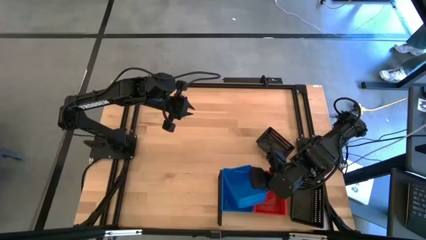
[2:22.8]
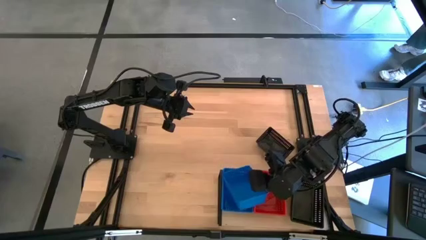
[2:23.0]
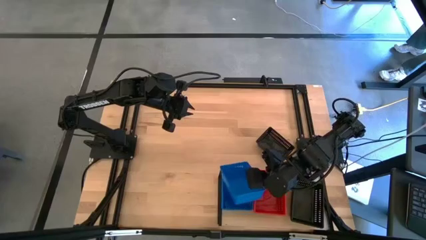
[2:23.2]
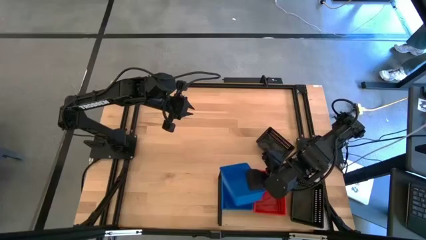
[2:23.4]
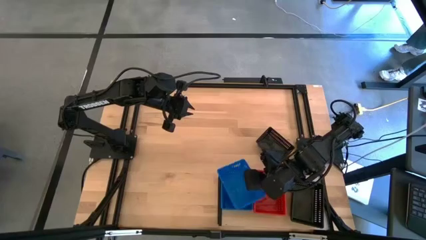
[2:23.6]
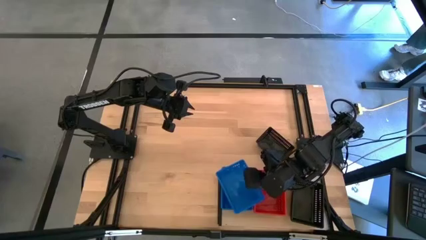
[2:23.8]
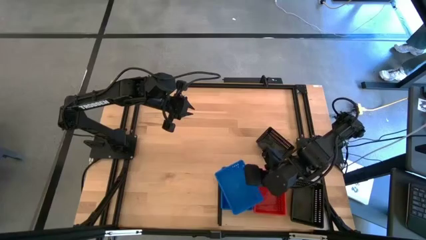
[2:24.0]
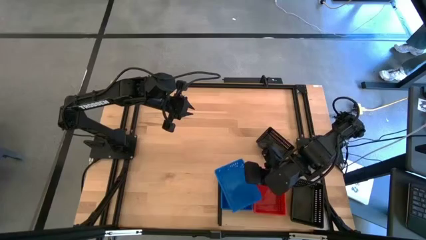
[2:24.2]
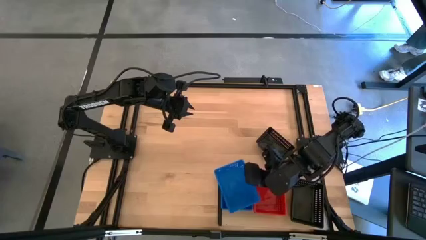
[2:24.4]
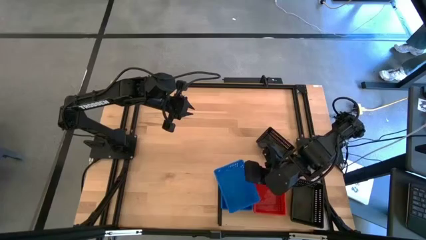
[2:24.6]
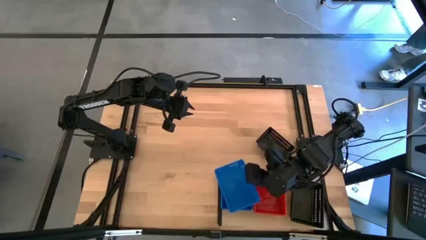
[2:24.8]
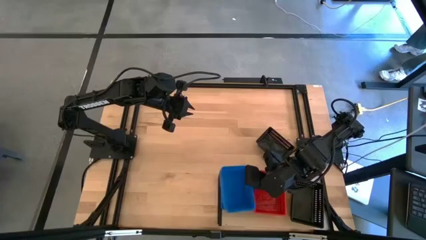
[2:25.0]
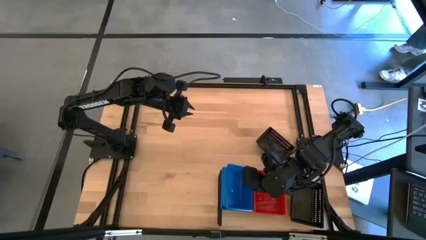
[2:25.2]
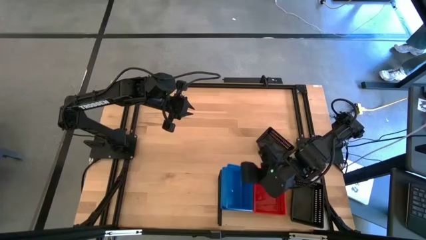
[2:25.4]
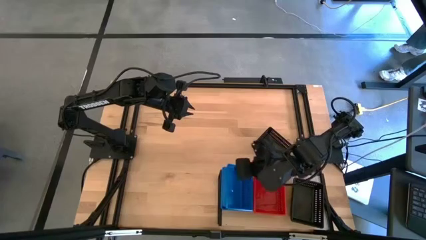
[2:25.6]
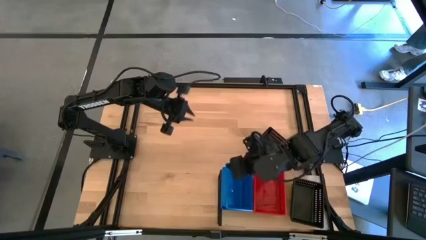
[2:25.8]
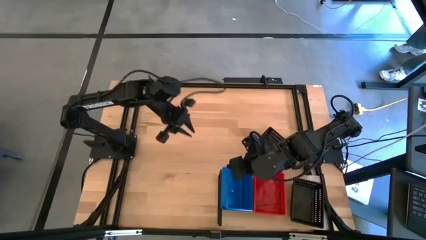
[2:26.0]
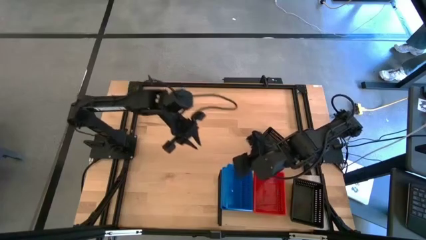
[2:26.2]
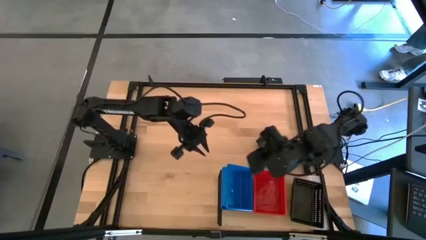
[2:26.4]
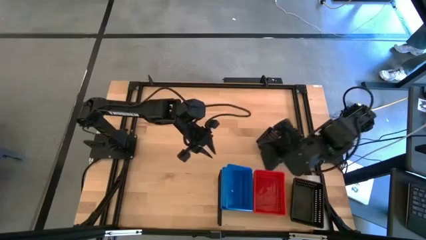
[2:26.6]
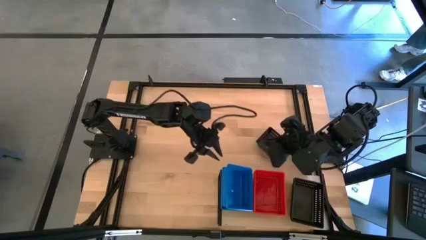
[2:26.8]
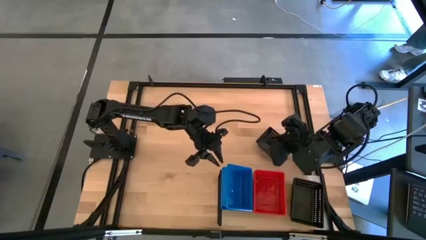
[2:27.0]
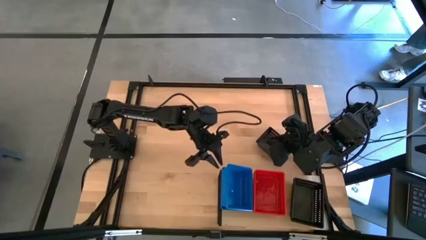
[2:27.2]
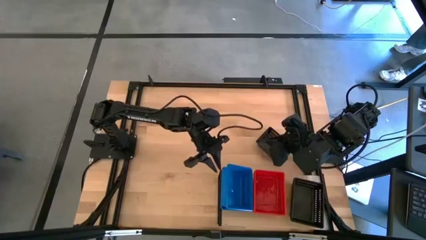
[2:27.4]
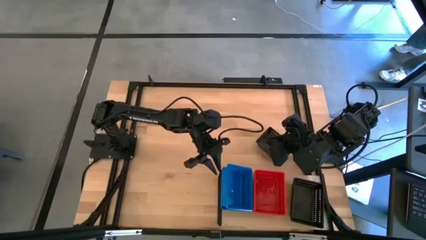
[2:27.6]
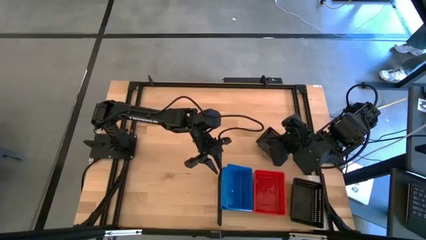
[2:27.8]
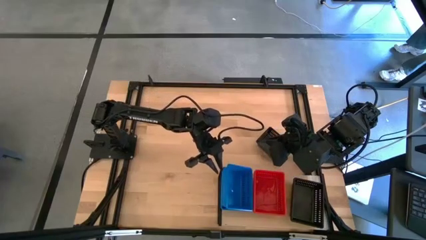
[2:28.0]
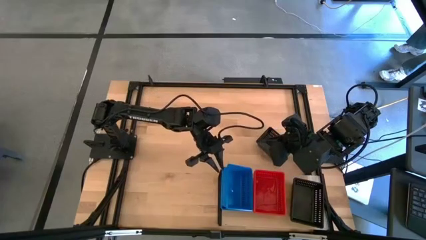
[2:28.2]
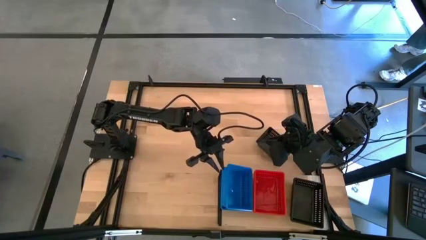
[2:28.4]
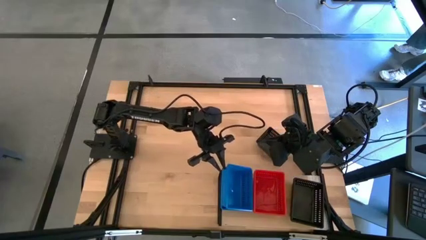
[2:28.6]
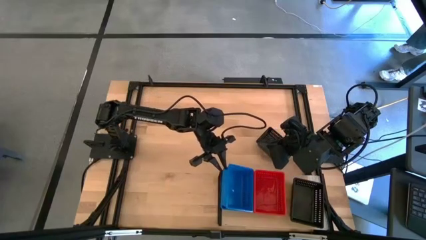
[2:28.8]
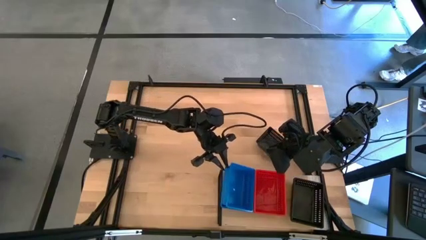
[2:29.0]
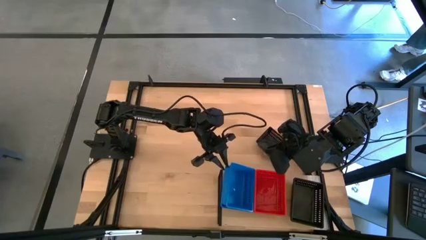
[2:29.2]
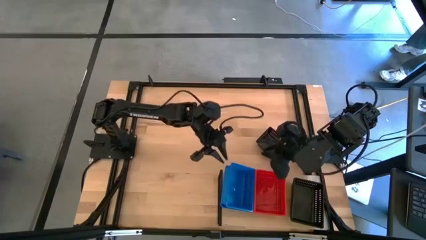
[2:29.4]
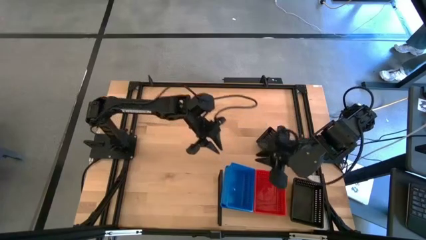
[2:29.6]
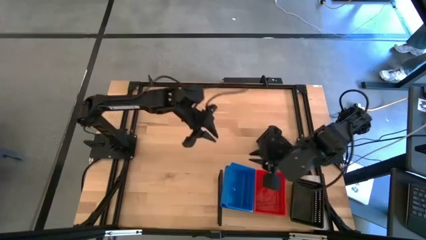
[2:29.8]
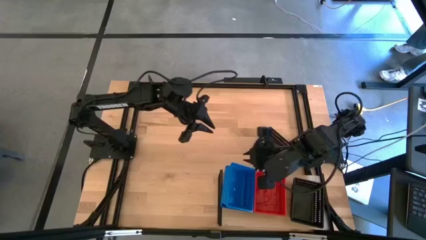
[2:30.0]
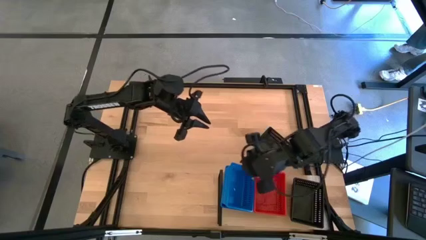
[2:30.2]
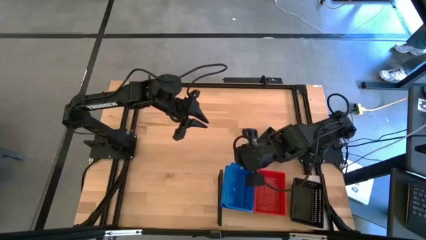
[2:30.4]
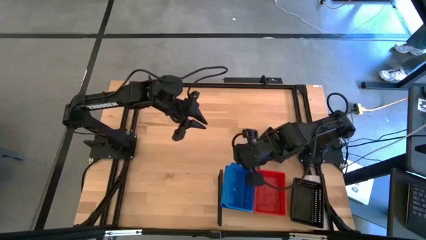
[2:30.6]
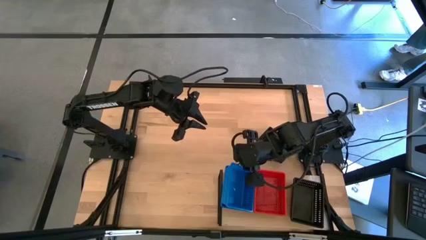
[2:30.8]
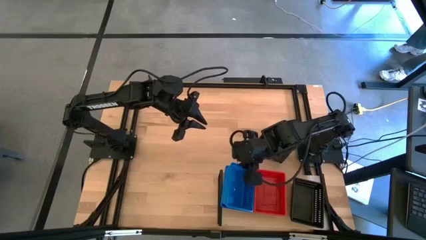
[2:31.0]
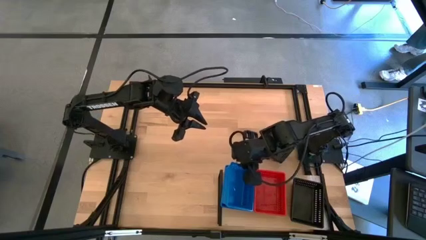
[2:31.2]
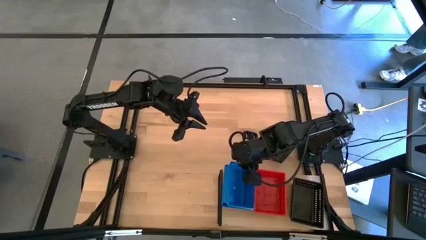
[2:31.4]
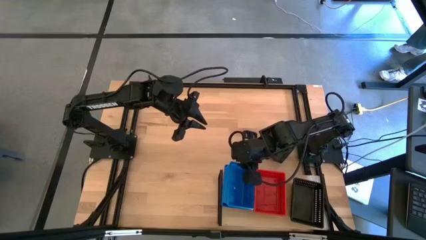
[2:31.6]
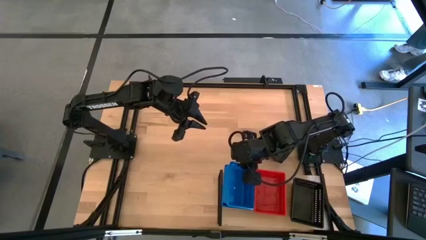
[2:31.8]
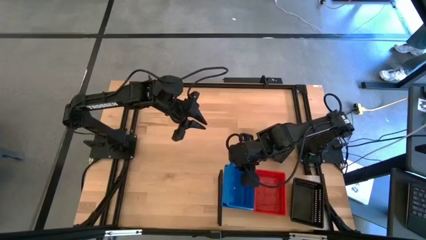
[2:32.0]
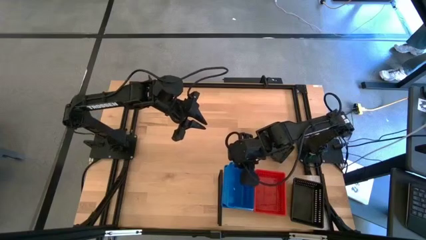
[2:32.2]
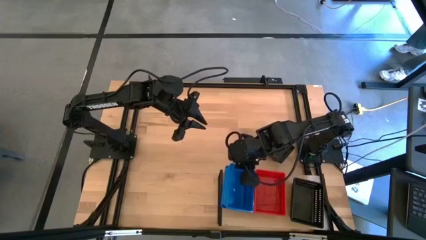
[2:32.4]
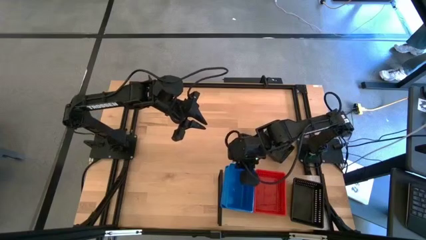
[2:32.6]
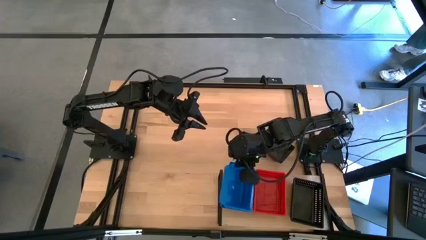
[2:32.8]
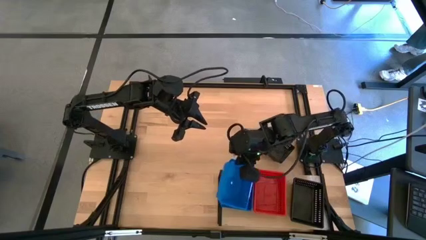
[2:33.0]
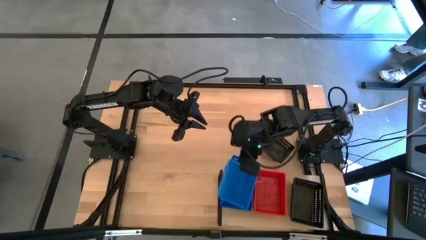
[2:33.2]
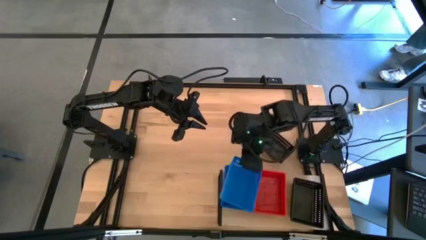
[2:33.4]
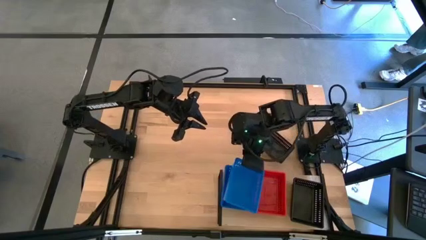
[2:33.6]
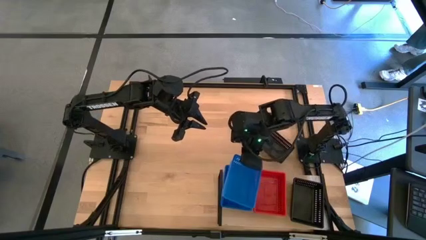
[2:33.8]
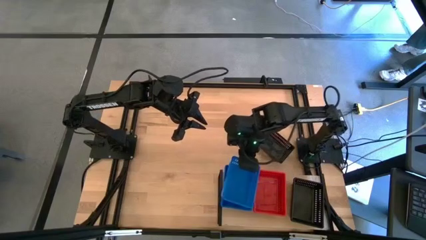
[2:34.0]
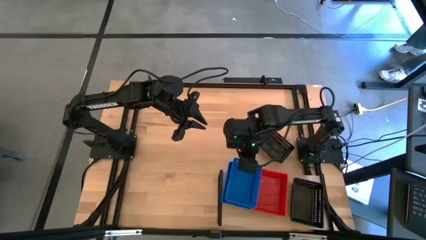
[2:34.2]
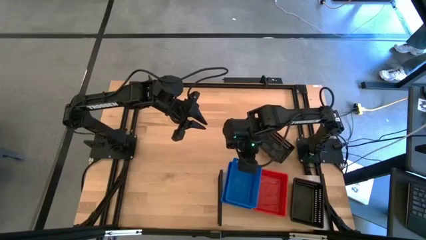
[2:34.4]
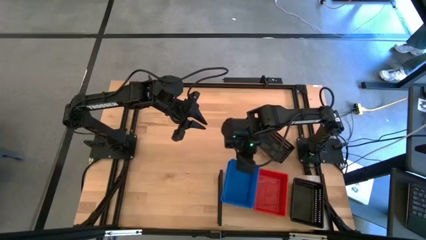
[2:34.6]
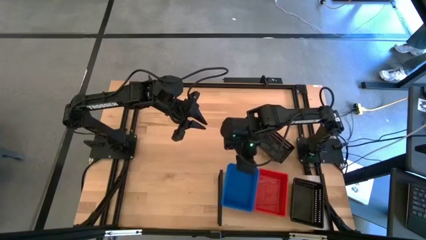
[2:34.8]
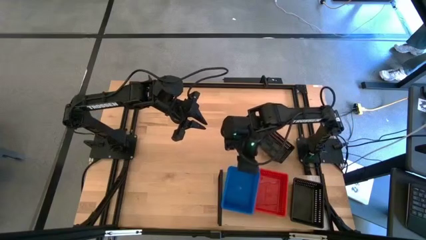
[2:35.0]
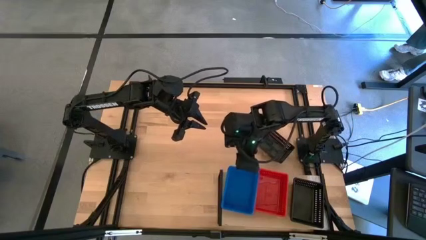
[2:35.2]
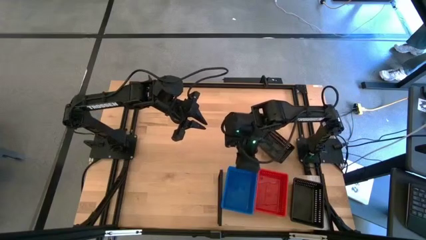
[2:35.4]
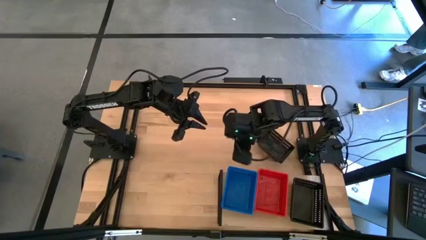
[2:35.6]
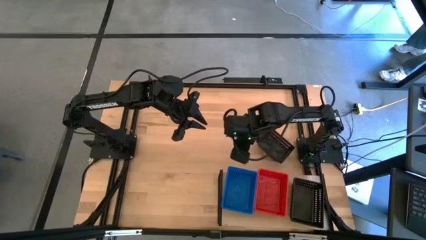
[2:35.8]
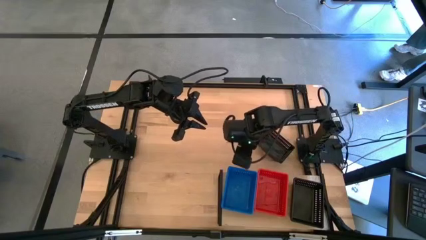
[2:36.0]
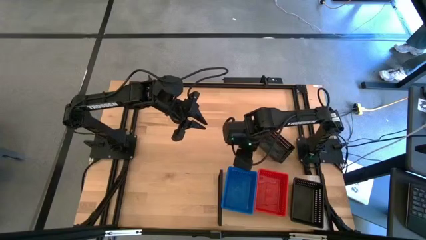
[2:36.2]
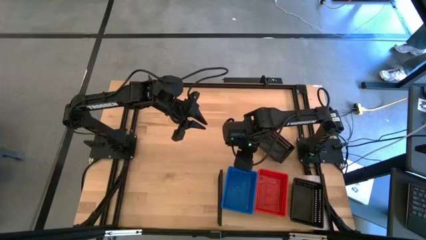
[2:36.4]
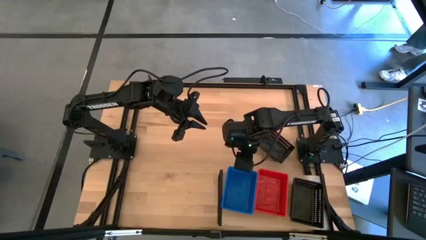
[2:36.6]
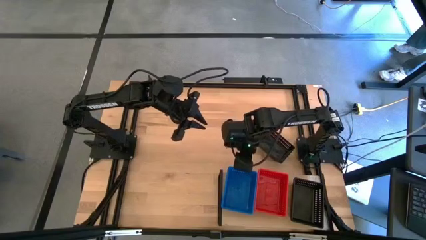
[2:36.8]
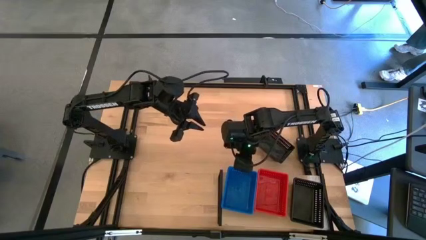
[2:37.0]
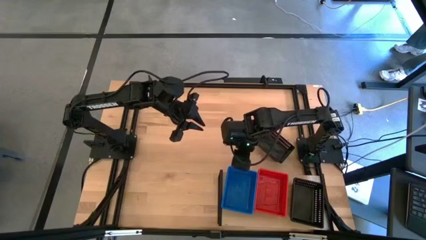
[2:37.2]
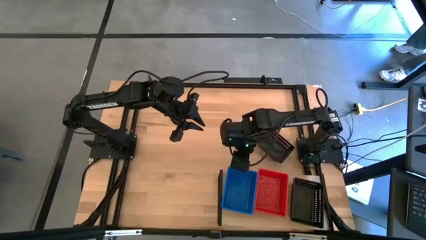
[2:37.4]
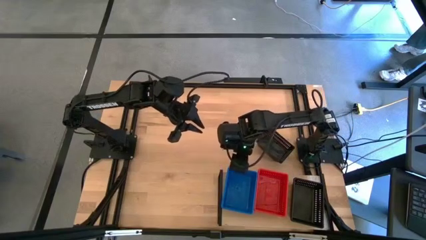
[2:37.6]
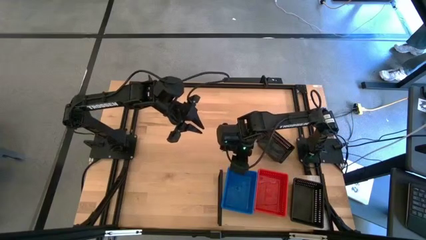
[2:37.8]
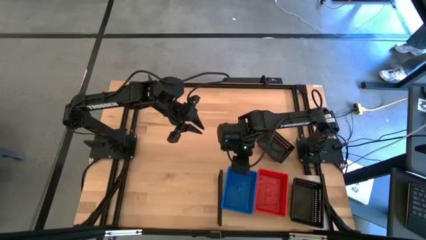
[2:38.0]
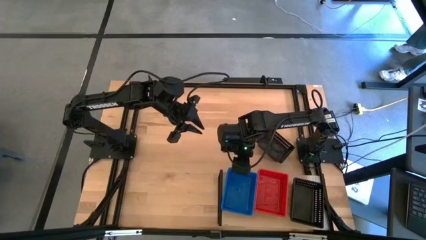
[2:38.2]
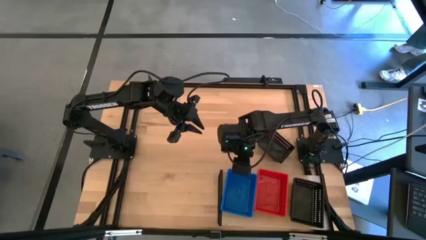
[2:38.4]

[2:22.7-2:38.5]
Task: Stack baskets on shelf by color
Stack the blue bin on top of the blue bins on the shelf
